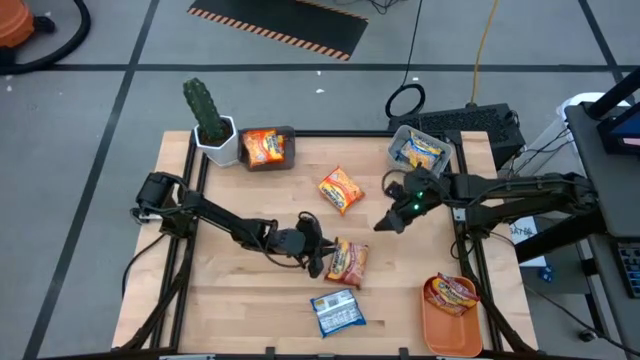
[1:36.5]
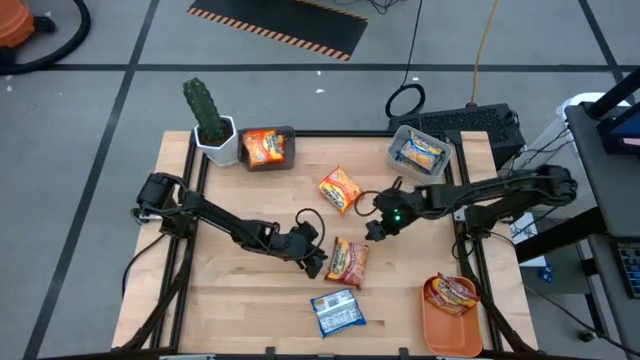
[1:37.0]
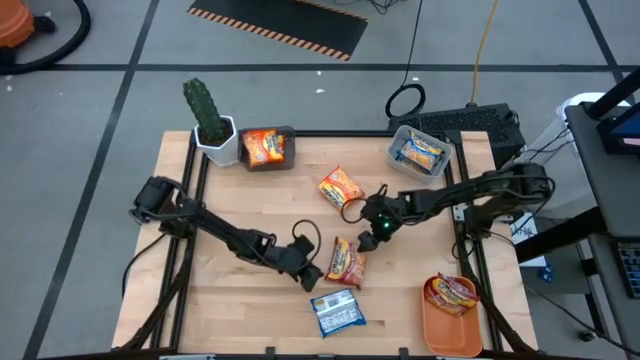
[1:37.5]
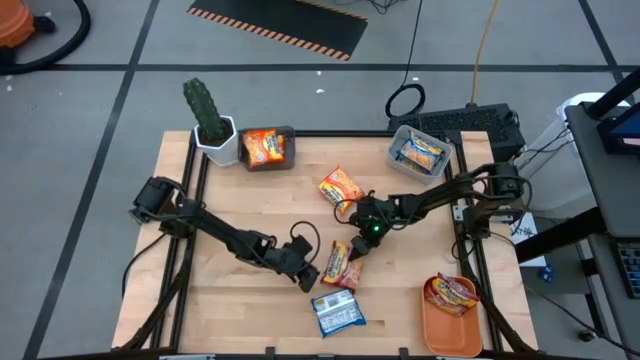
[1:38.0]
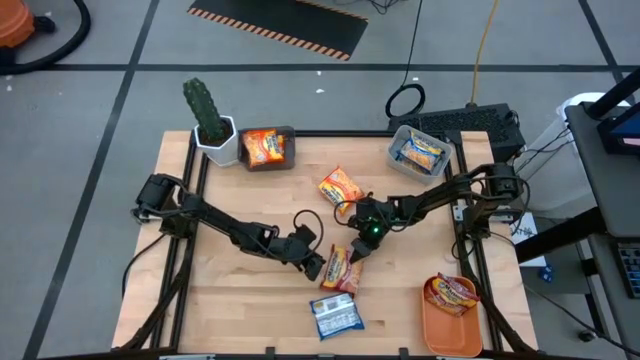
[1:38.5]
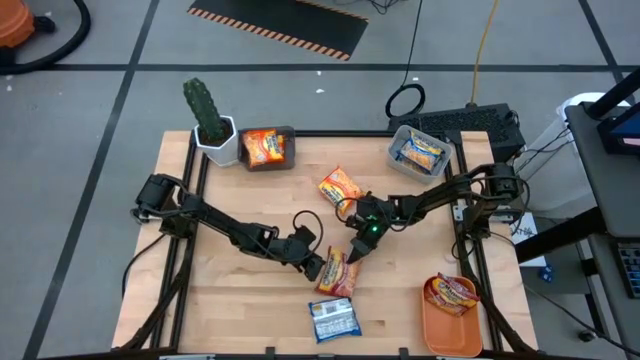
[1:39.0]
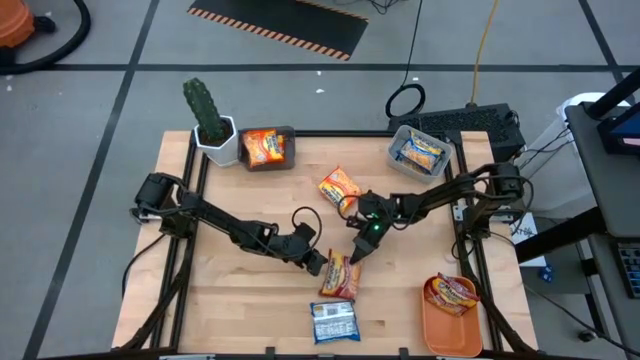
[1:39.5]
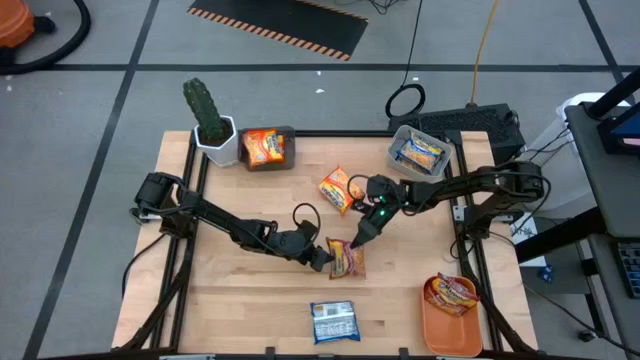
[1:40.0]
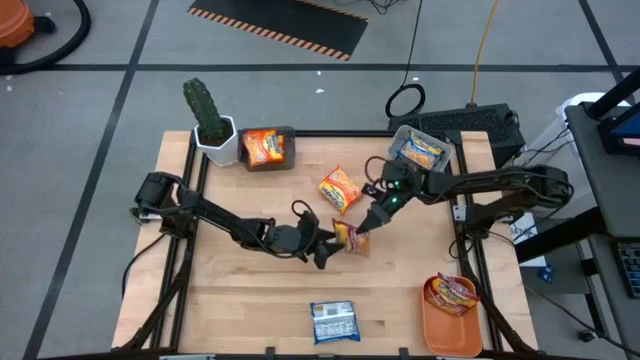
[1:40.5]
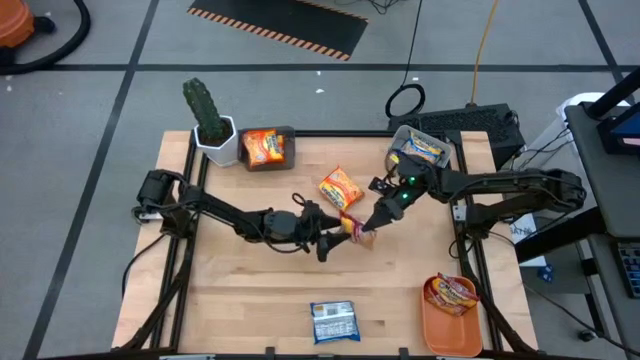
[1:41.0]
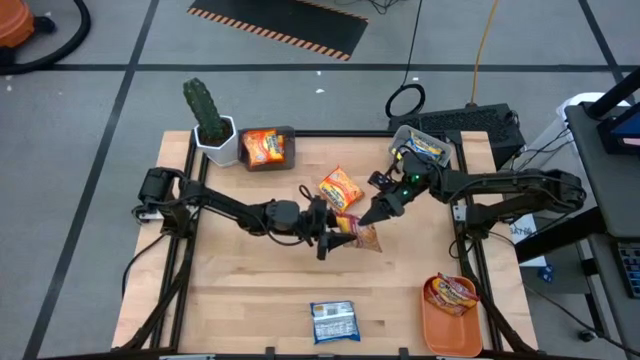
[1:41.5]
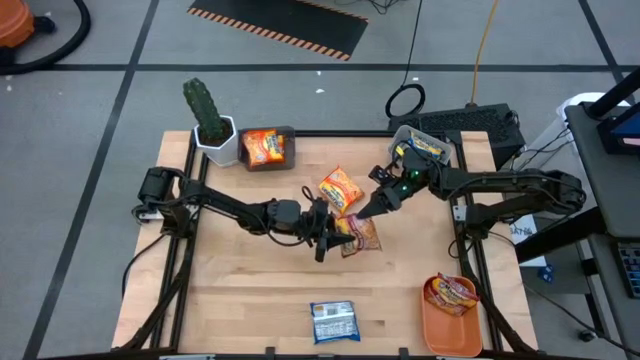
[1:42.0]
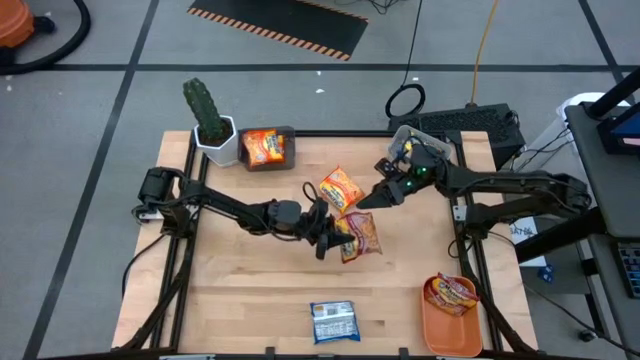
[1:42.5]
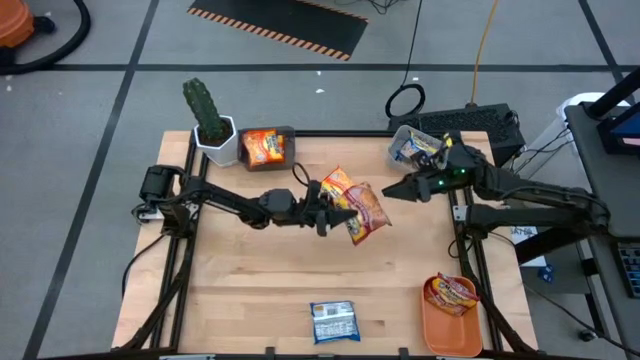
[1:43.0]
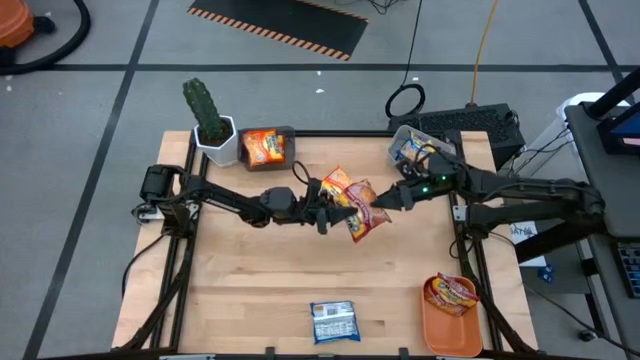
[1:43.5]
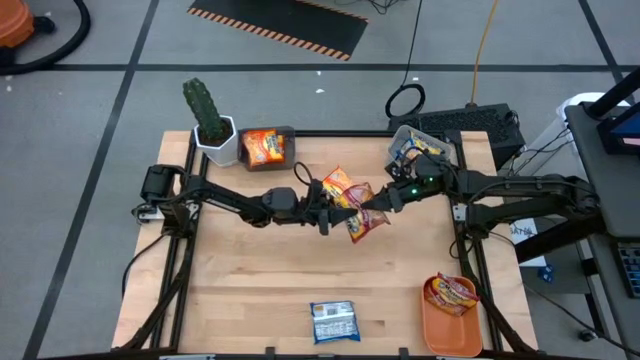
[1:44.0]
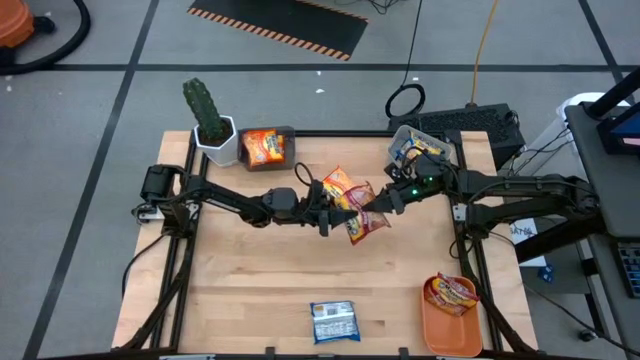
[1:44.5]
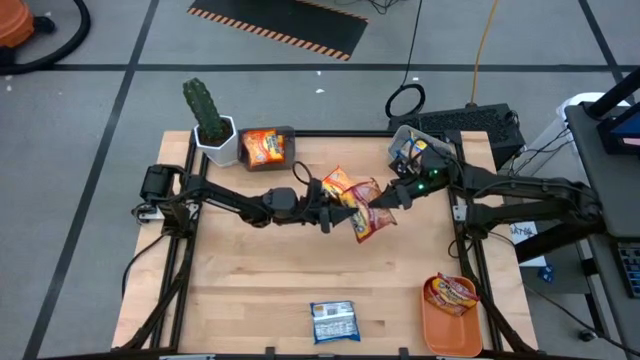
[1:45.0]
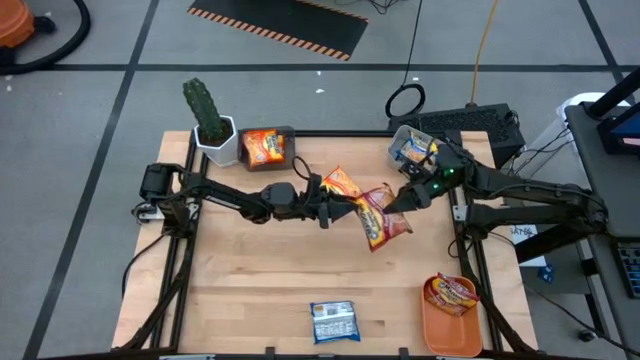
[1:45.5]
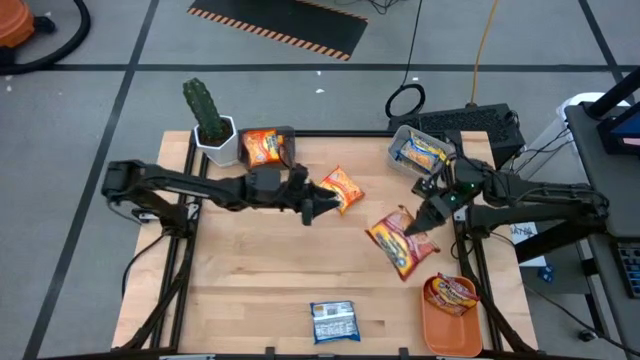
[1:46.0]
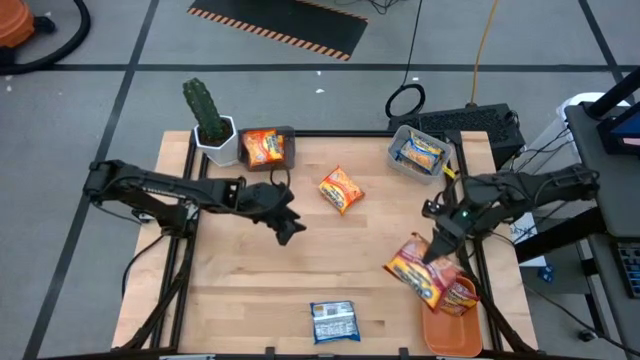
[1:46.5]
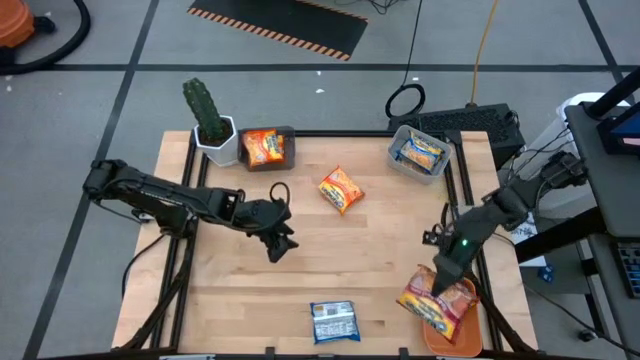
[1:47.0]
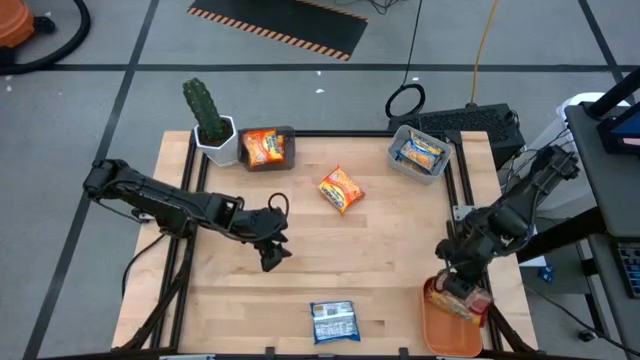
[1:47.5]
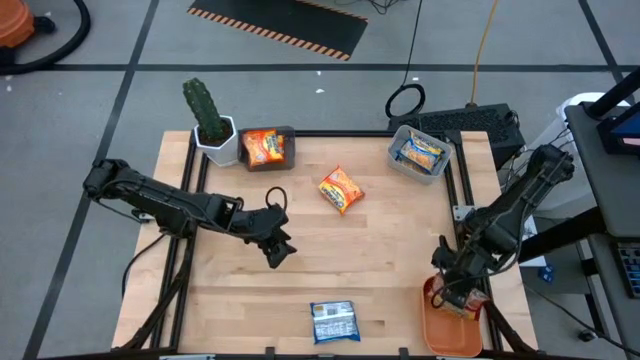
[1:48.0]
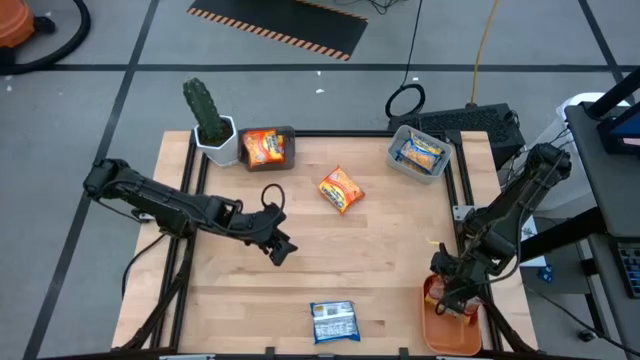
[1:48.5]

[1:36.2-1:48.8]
Task: Sort Maruchan noodles
Put the red noodle pack into the orange bin

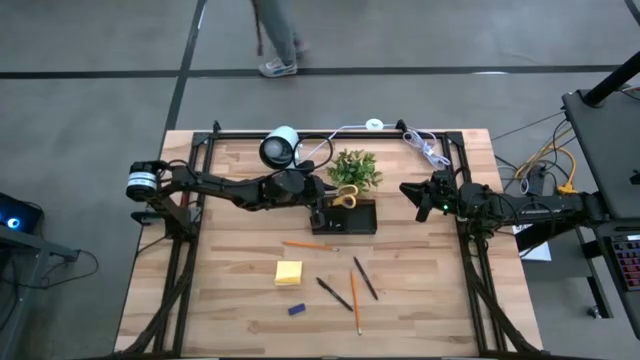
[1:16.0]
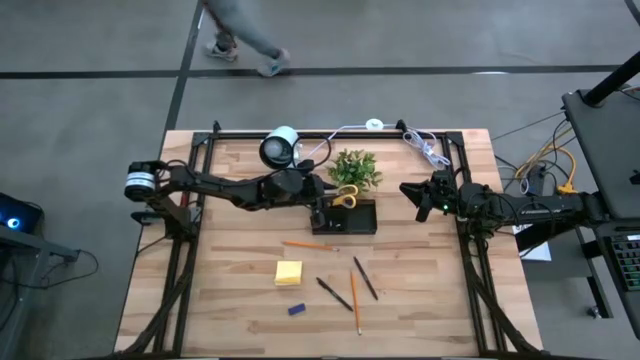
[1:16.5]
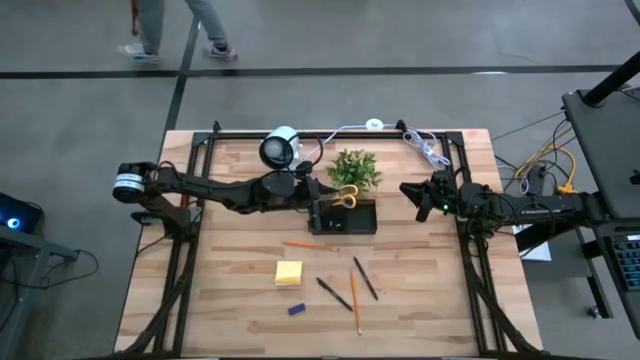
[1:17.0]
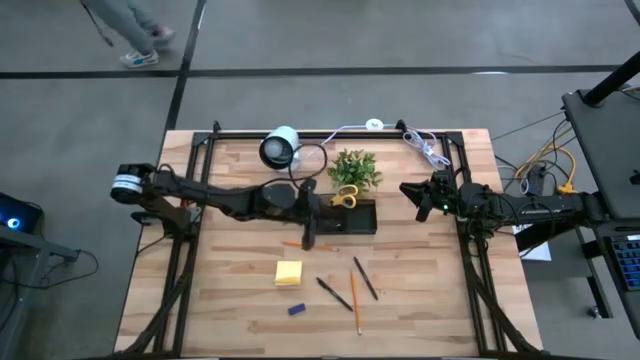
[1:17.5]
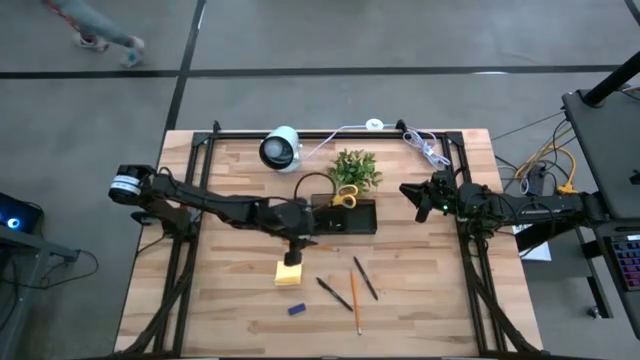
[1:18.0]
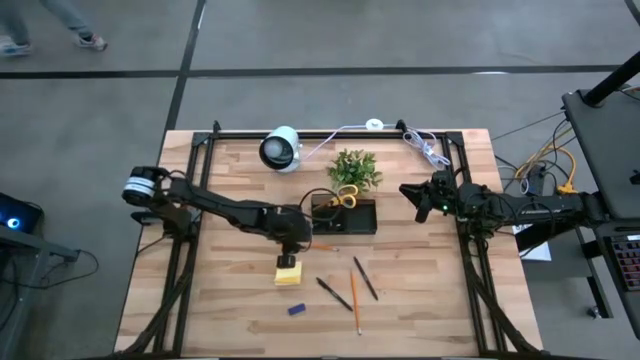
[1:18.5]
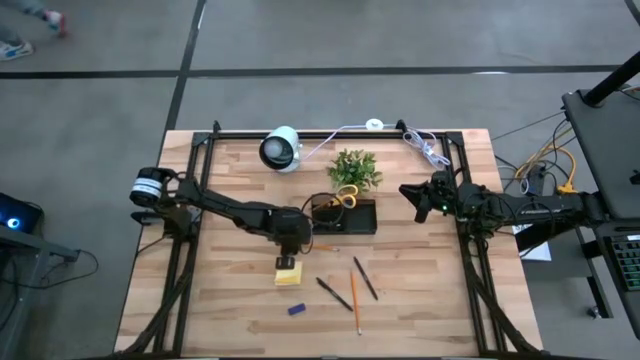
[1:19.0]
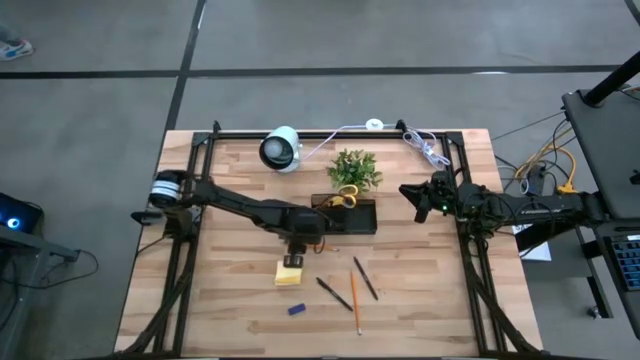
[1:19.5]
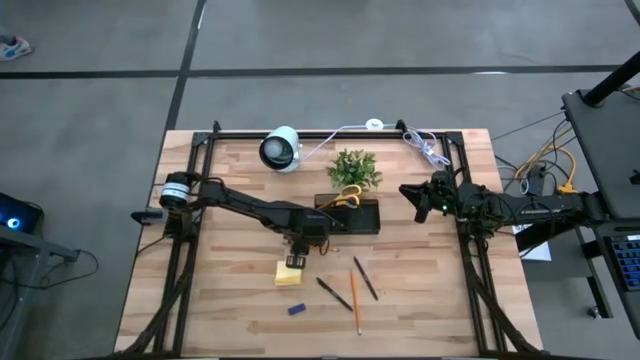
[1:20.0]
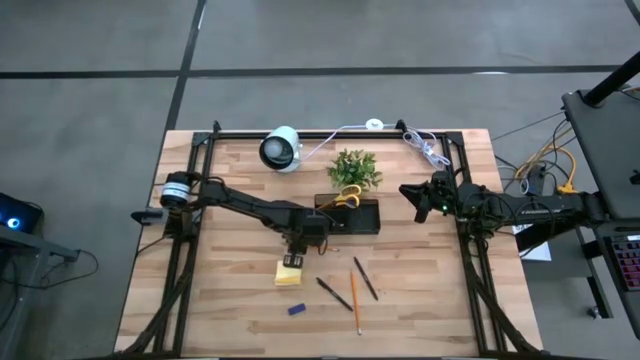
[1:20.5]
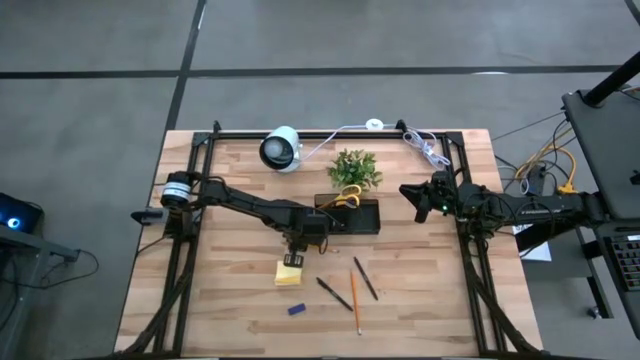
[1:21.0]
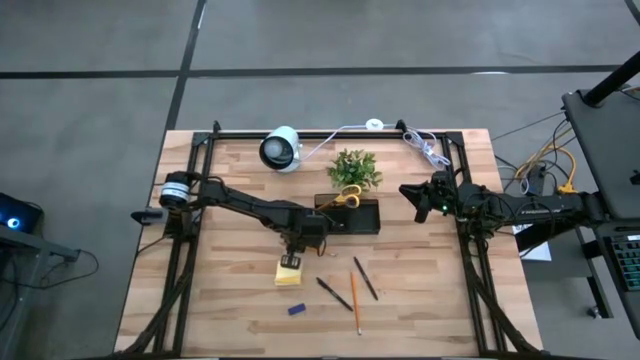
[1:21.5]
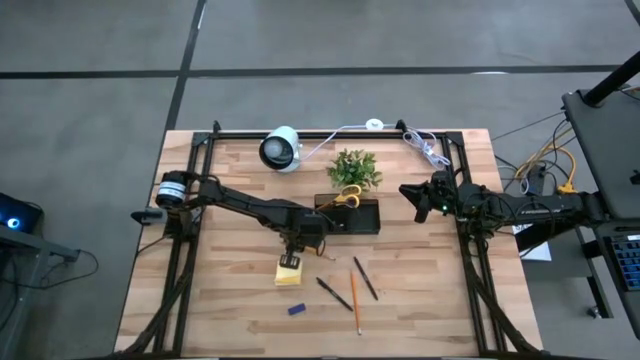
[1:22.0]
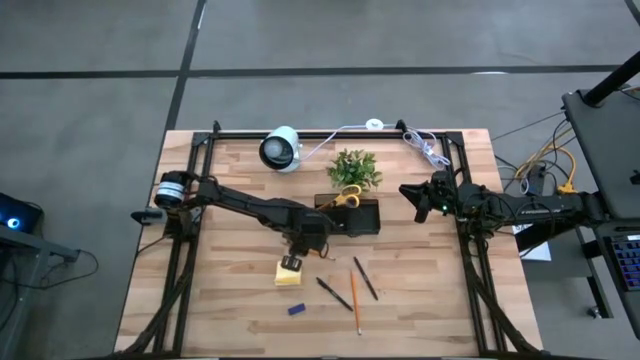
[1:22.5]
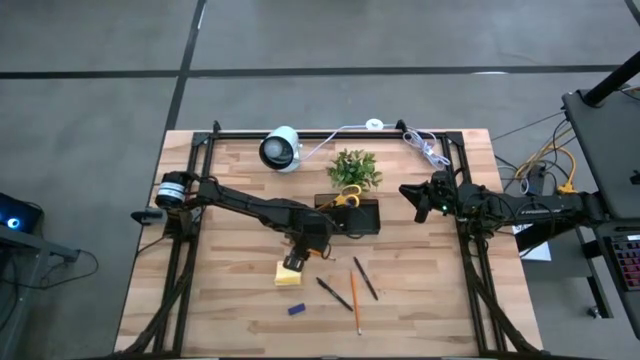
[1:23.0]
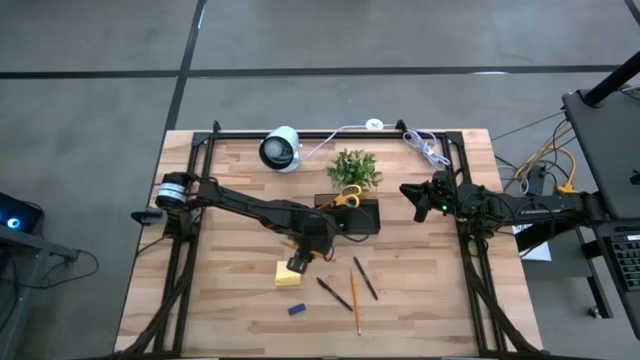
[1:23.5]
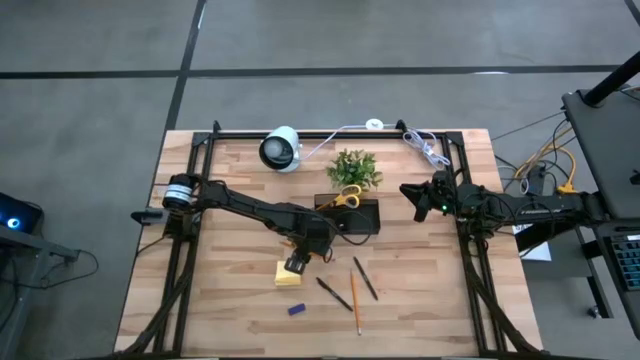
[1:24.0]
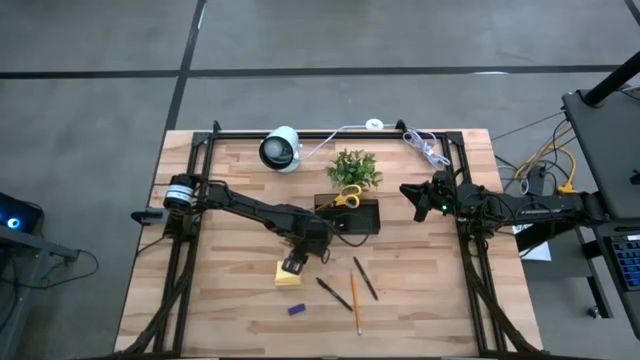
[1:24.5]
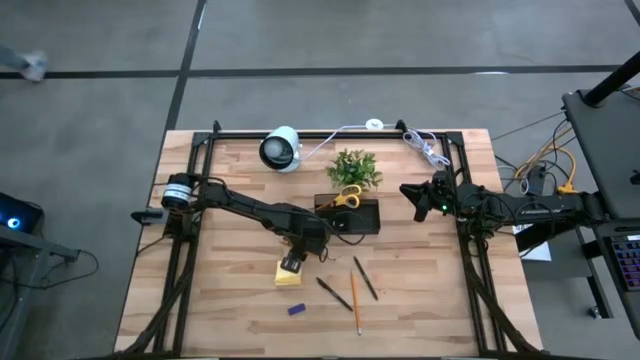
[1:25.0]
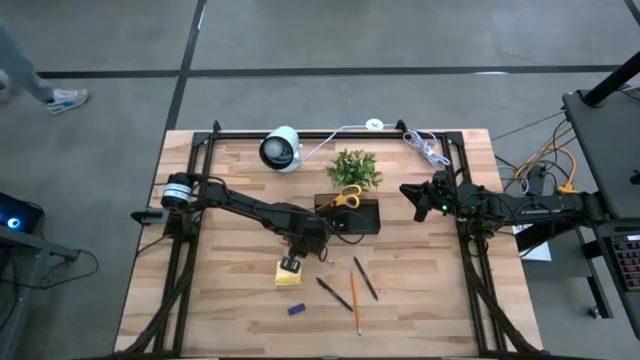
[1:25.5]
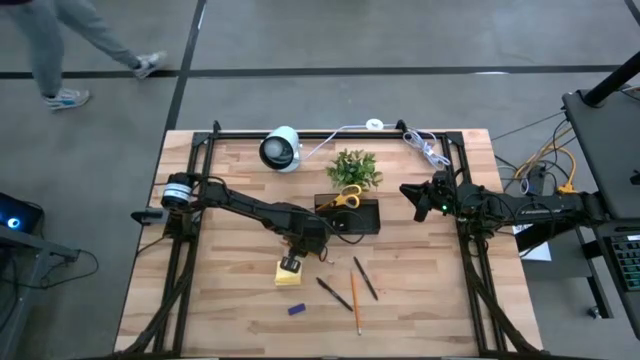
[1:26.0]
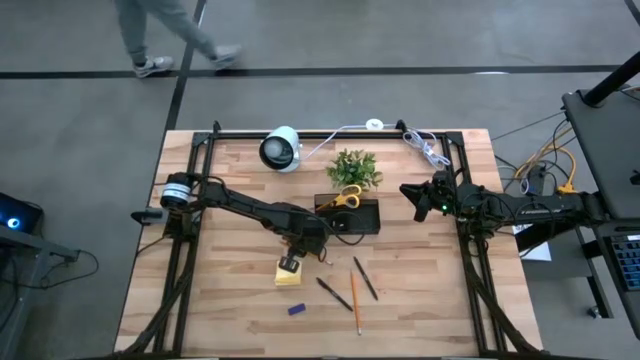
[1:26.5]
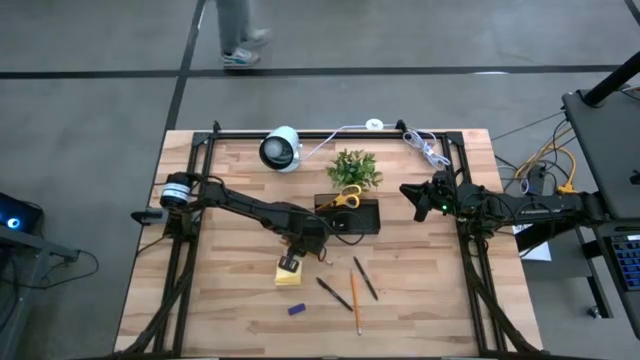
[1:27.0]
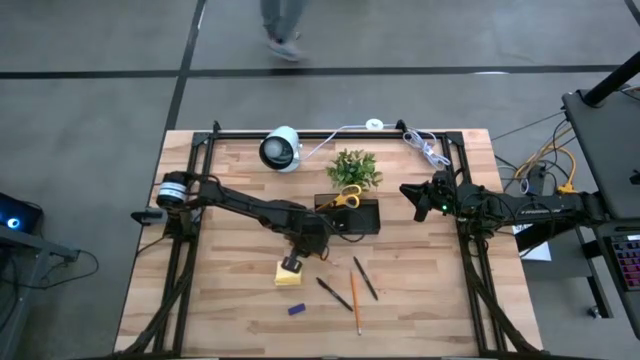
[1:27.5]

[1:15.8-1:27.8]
Task: Pick and place office supplies into organizer
Put the top orange pencil into the black desk organizer
